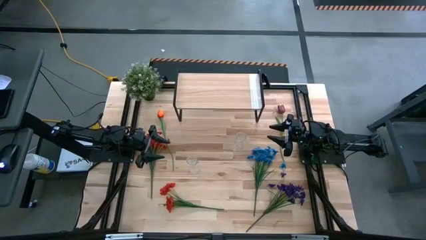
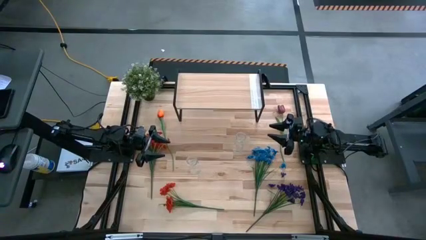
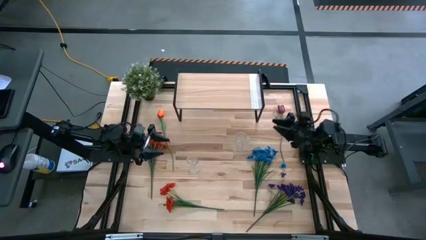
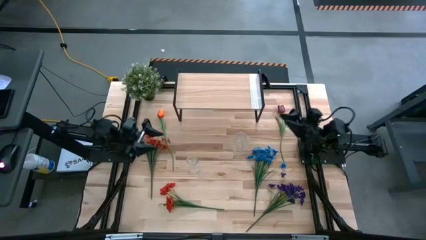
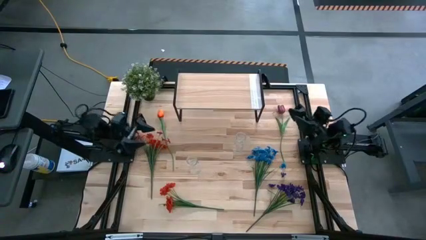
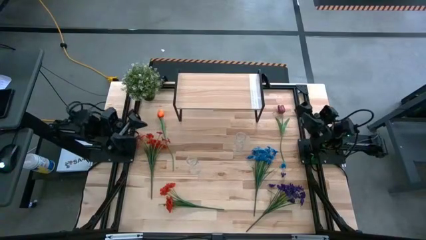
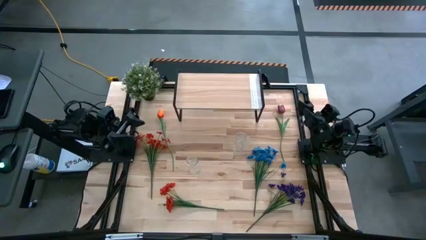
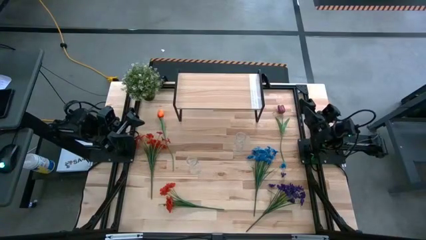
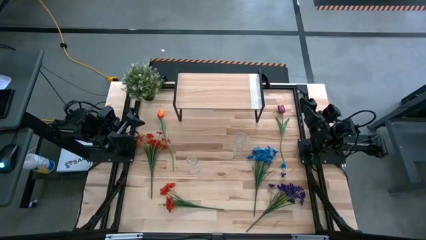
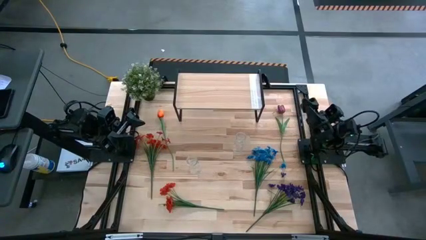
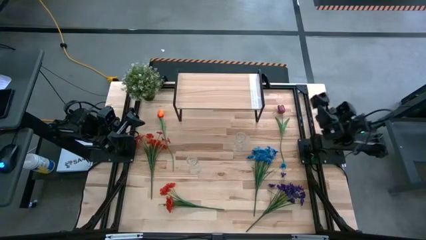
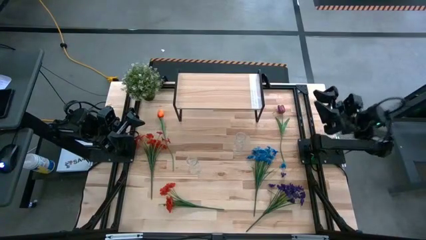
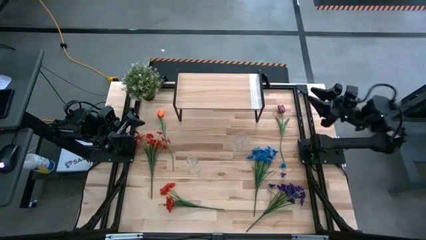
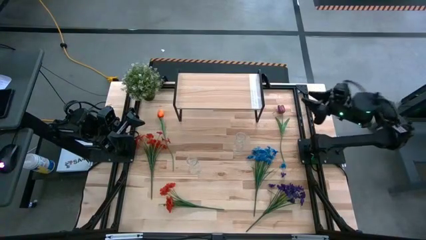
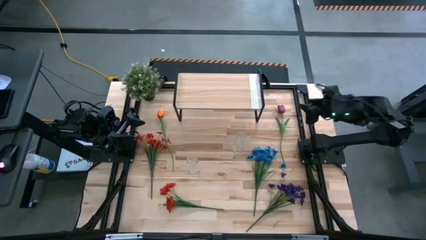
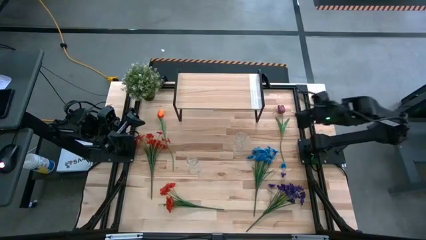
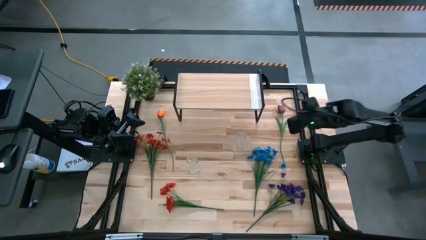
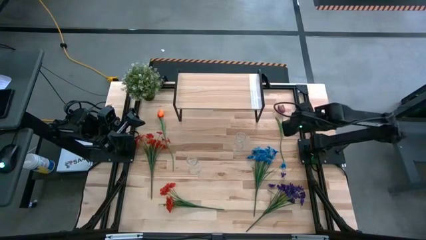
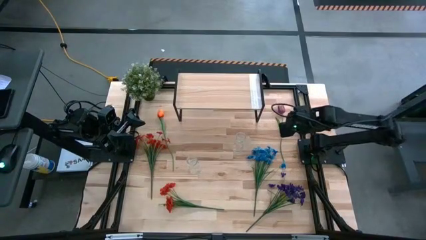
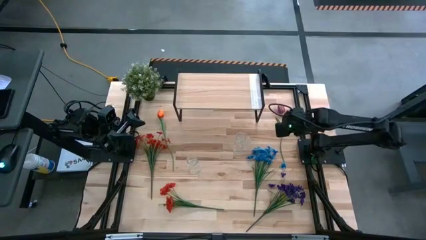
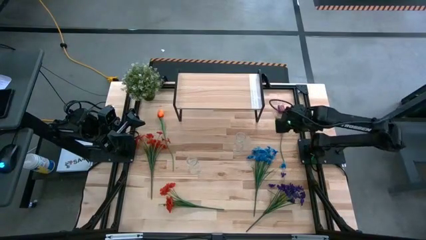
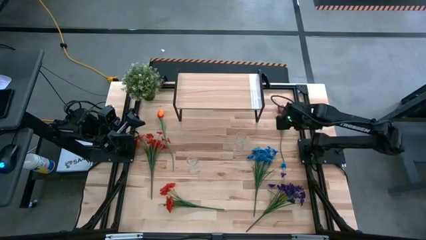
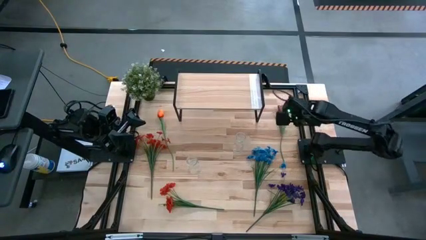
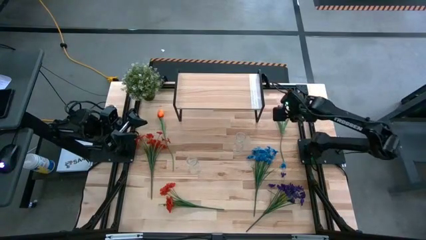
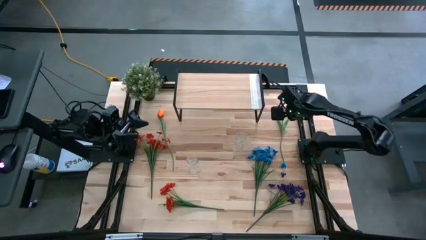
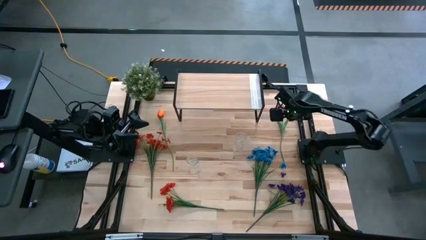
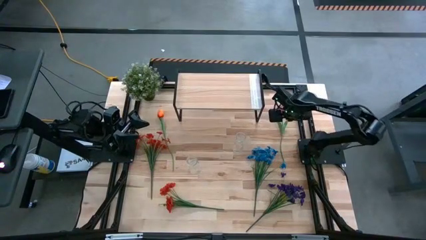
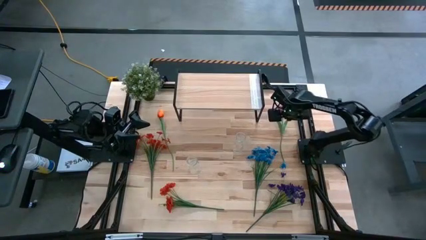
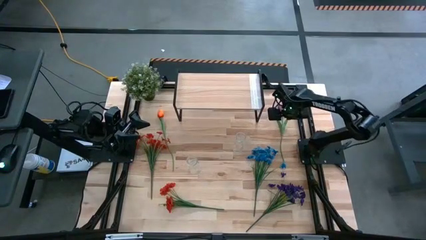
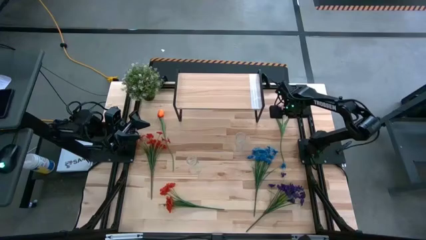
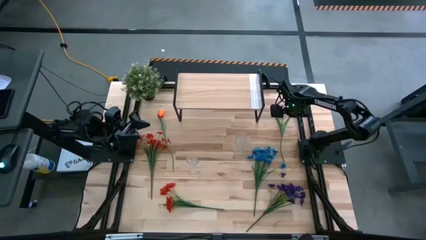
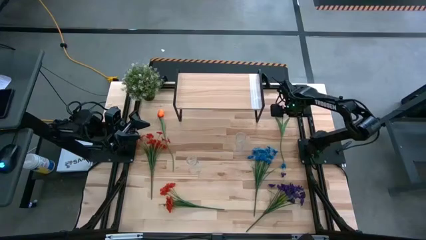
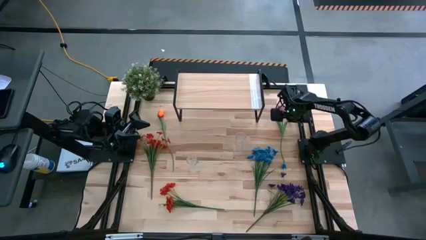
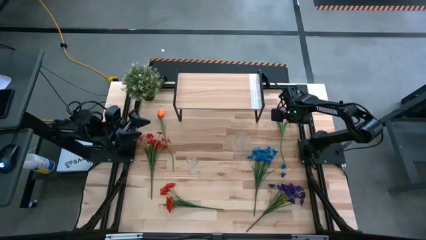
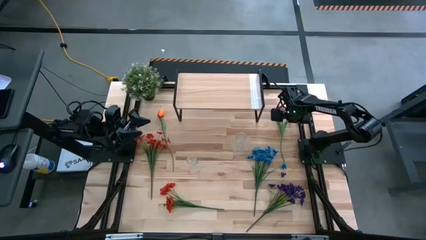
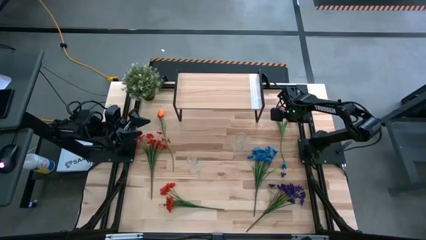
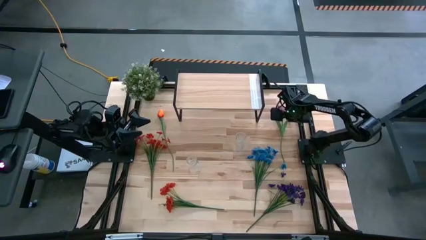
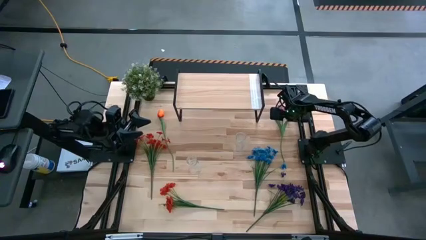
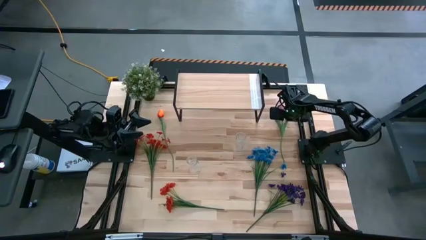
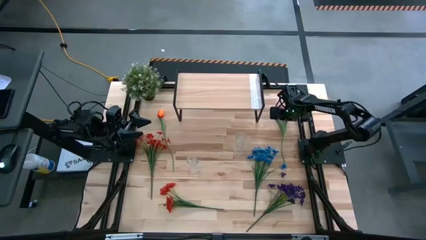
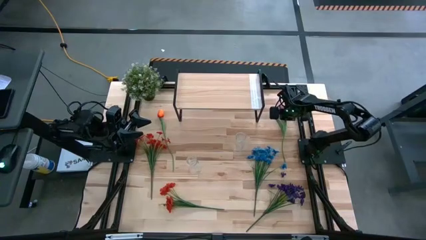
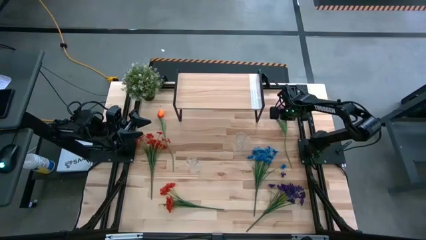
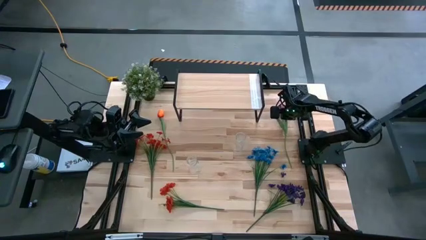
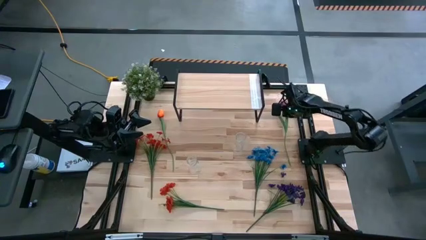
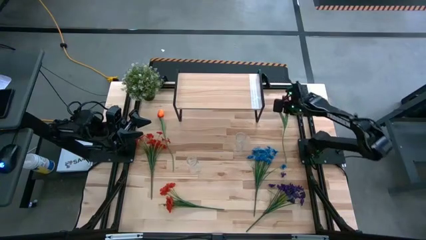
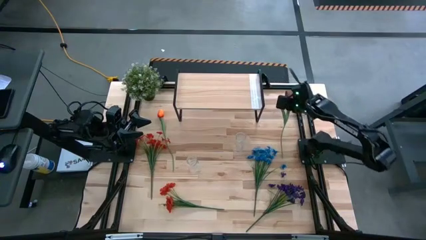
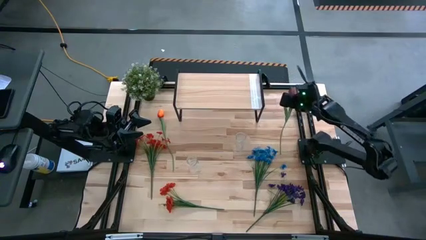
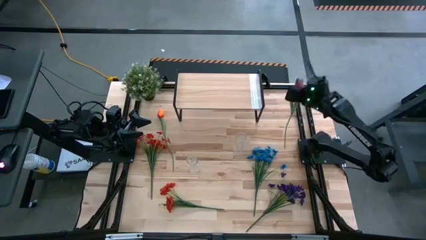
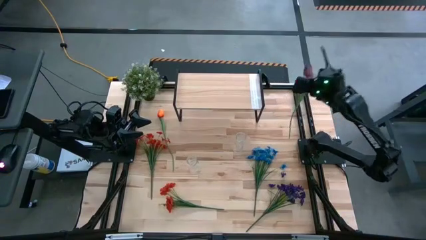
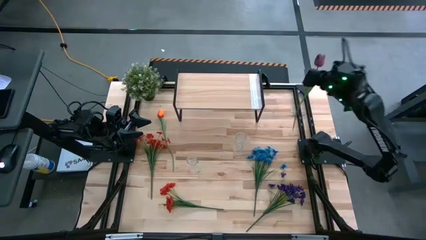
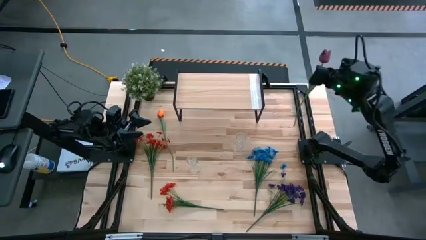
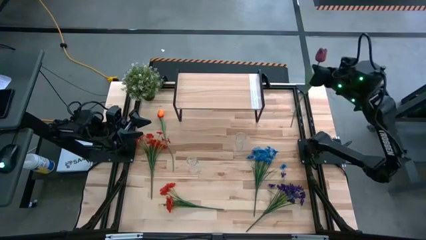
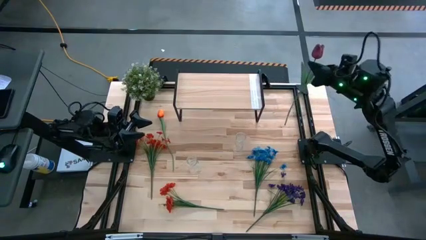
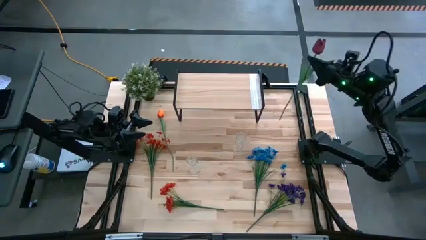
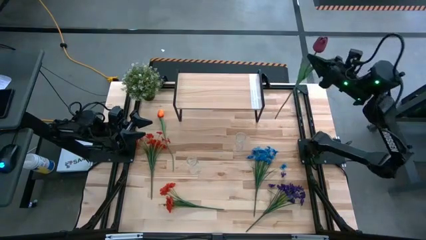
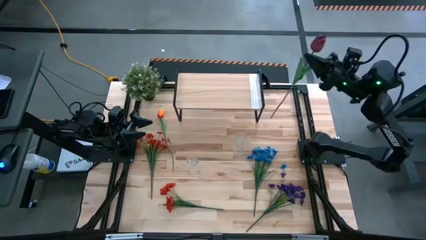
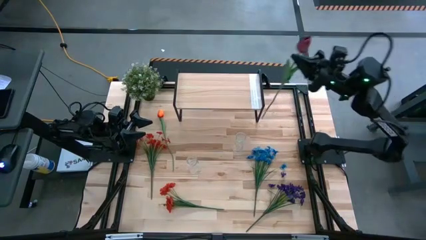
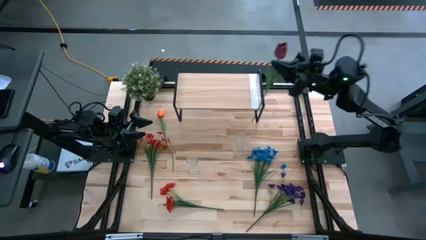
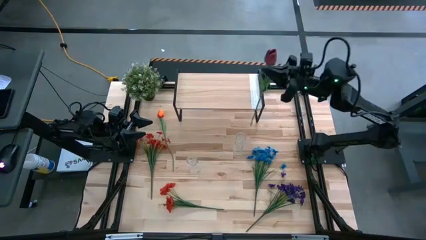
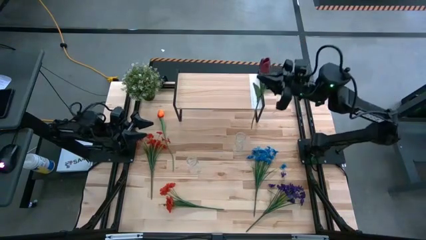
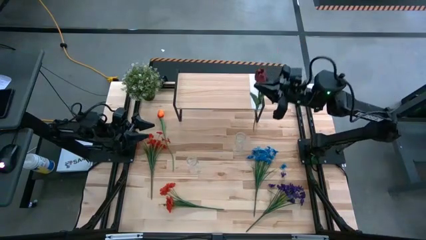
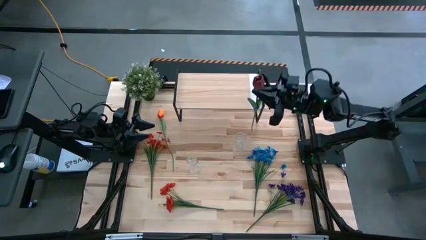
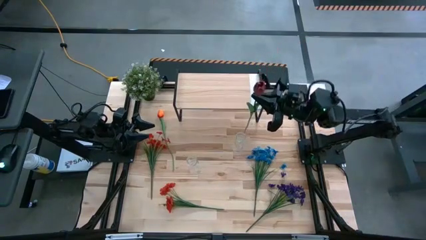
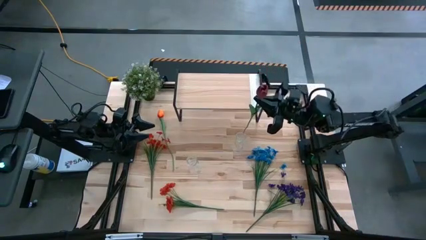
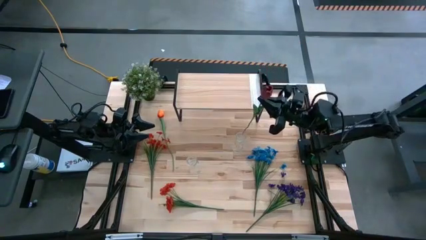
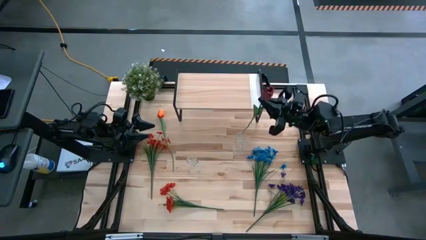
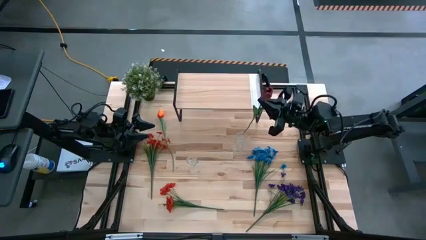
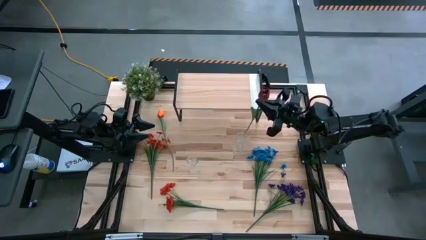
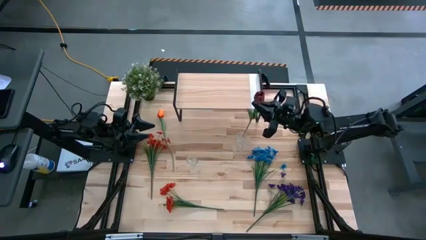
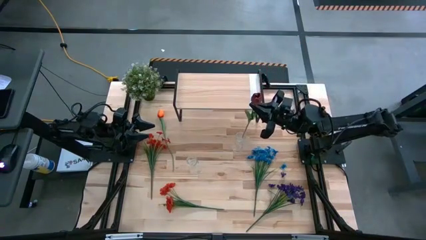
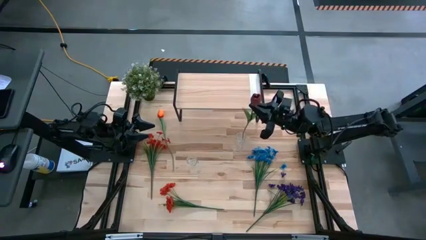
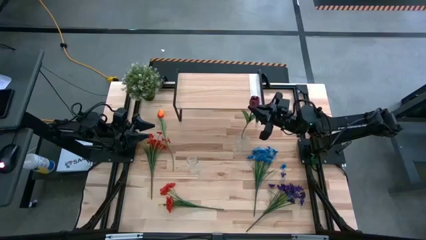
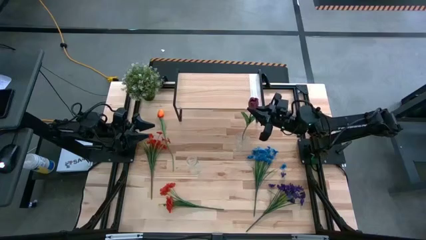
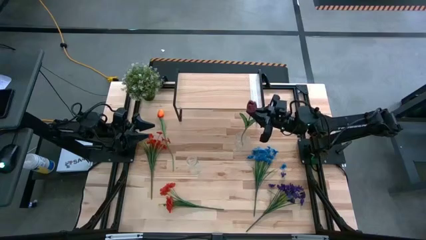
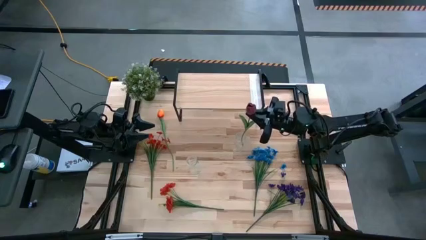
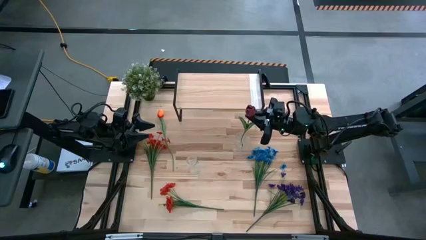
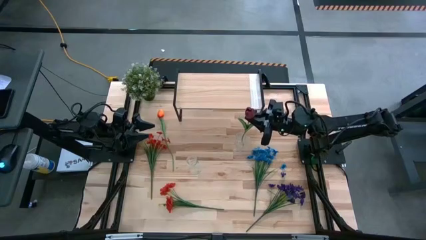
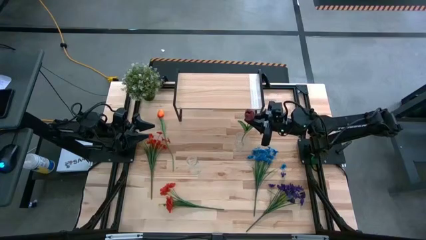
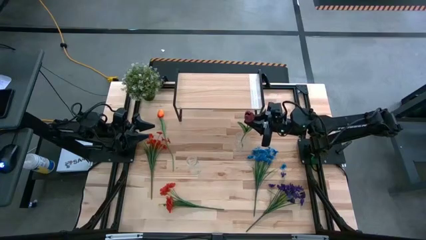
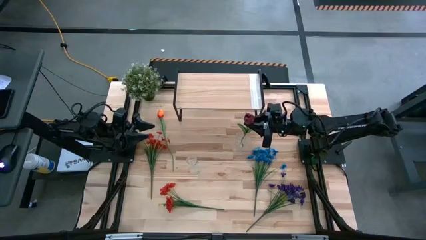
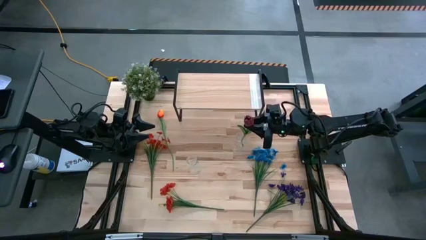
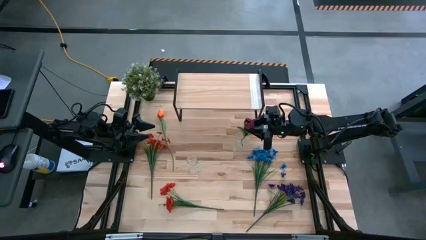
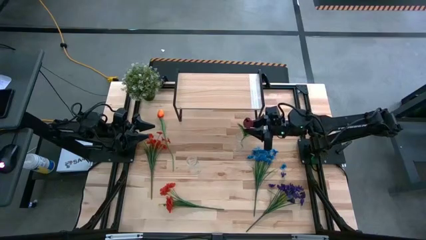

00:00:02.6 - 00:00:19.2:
Task: Pick and place flowers into a vace then onto a shelf
Put the dark red tulip into the right transparent vase
